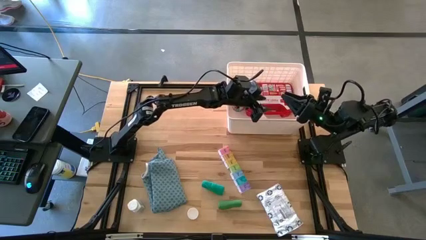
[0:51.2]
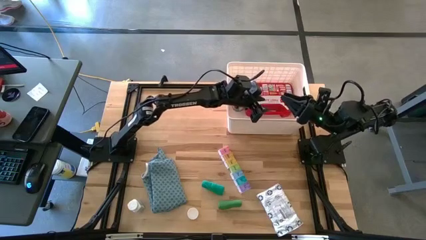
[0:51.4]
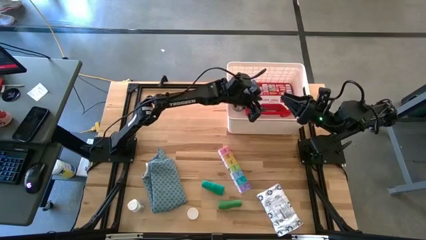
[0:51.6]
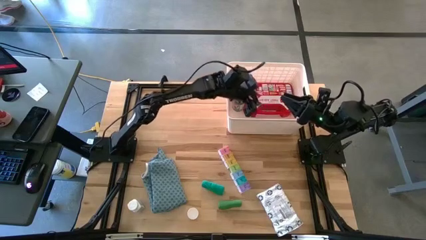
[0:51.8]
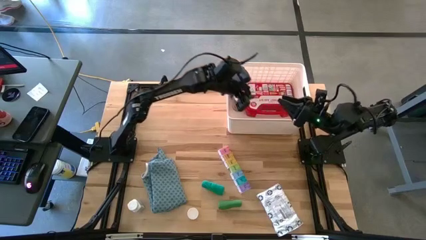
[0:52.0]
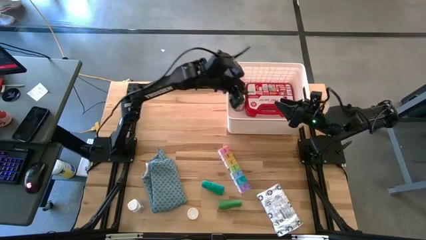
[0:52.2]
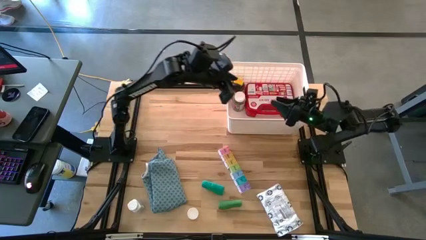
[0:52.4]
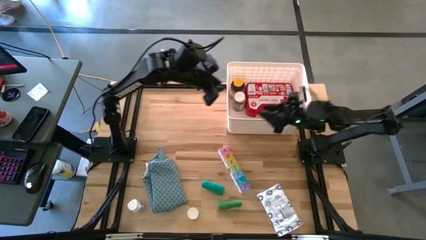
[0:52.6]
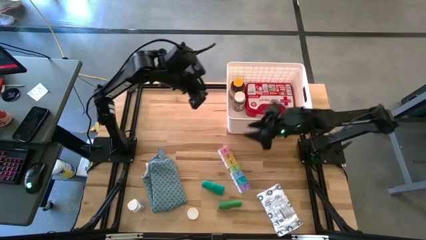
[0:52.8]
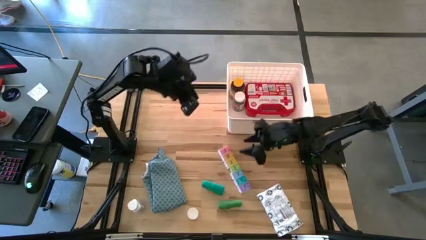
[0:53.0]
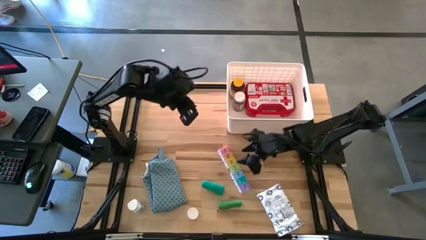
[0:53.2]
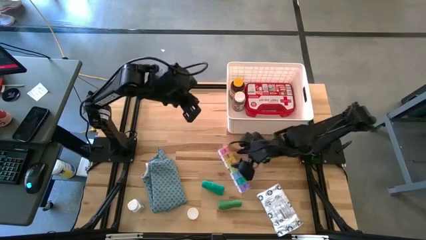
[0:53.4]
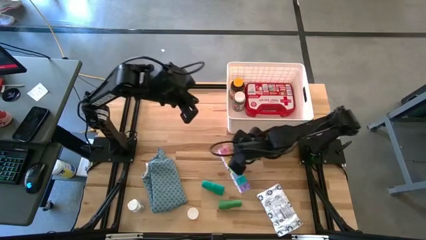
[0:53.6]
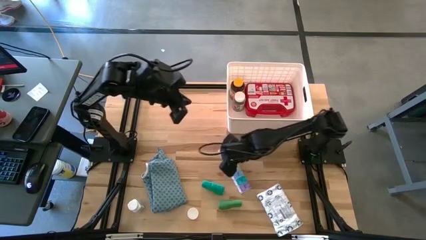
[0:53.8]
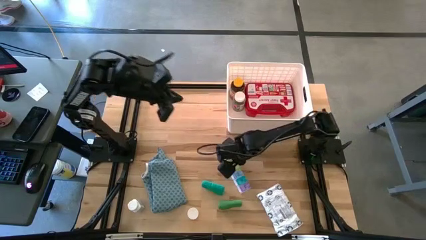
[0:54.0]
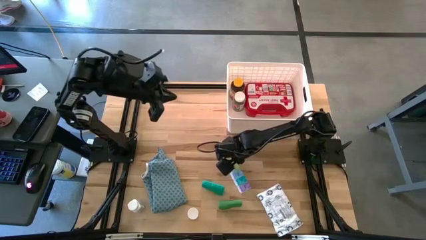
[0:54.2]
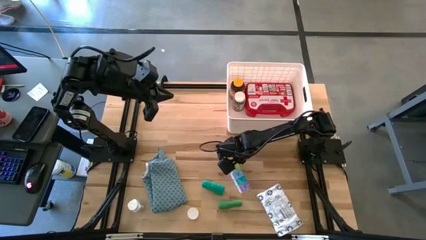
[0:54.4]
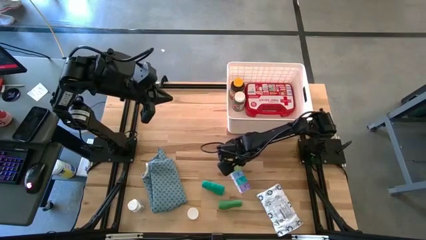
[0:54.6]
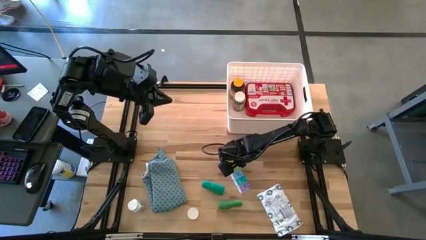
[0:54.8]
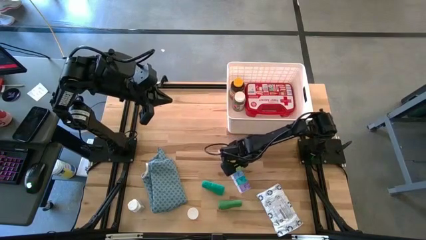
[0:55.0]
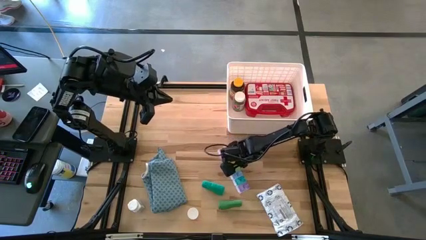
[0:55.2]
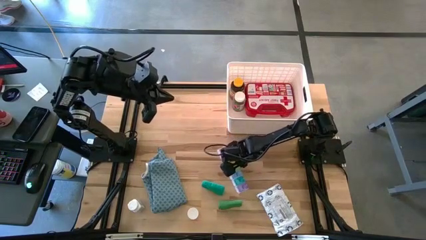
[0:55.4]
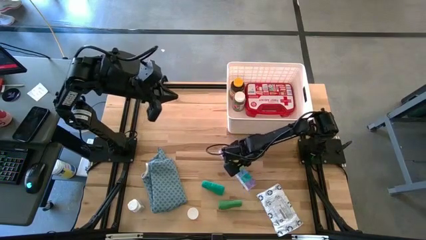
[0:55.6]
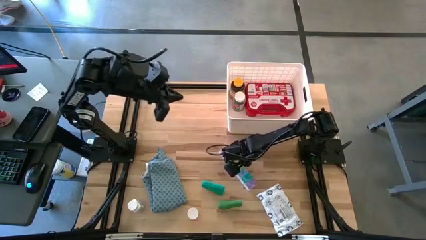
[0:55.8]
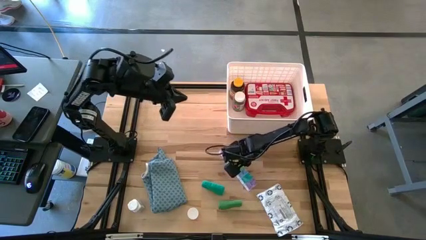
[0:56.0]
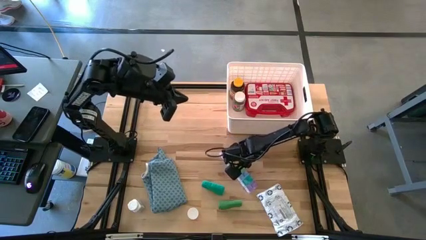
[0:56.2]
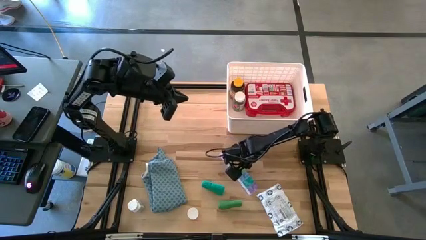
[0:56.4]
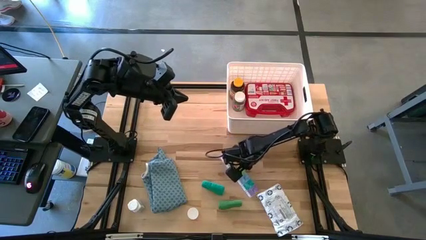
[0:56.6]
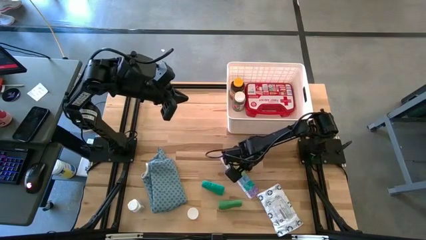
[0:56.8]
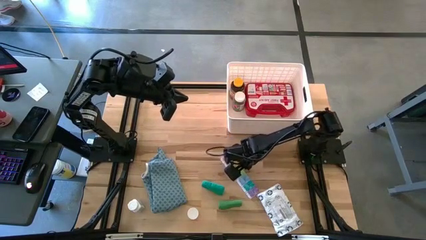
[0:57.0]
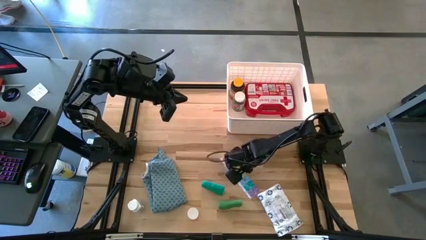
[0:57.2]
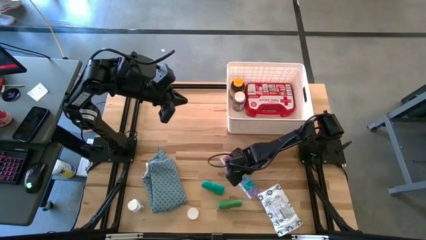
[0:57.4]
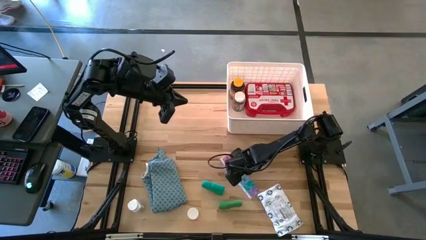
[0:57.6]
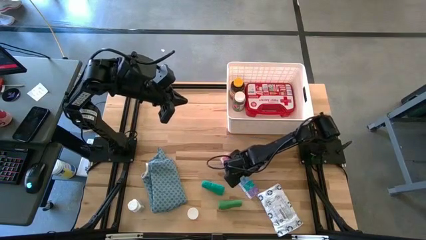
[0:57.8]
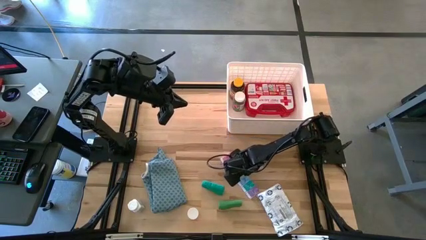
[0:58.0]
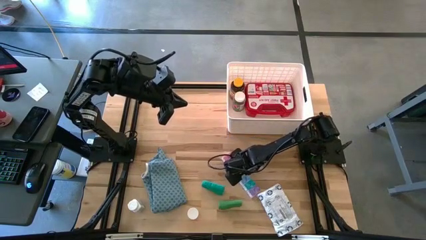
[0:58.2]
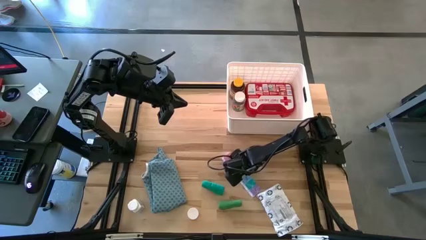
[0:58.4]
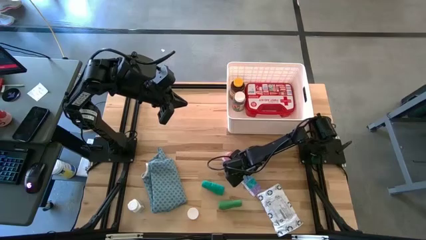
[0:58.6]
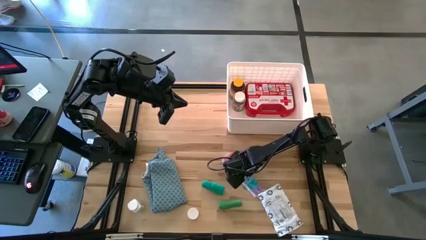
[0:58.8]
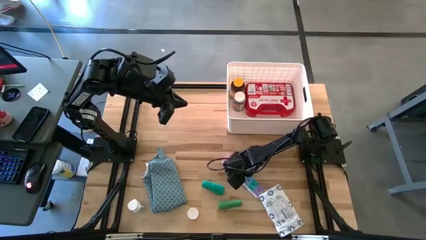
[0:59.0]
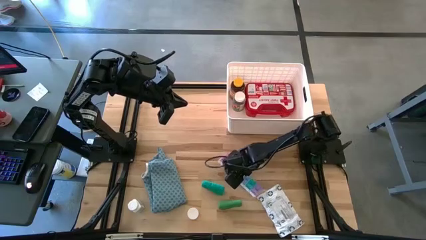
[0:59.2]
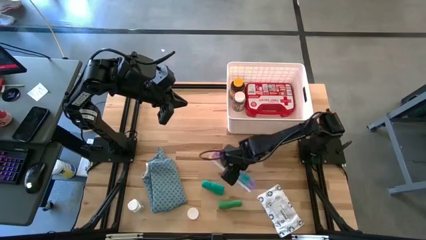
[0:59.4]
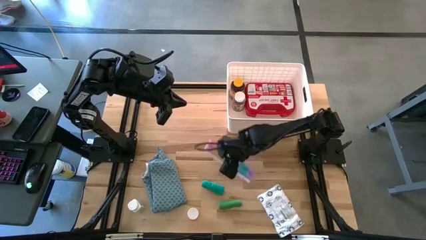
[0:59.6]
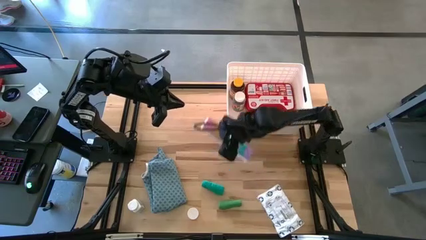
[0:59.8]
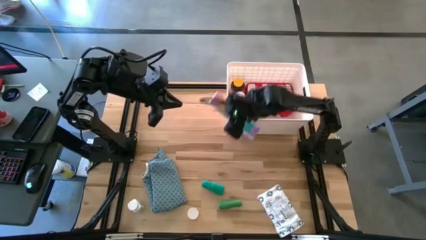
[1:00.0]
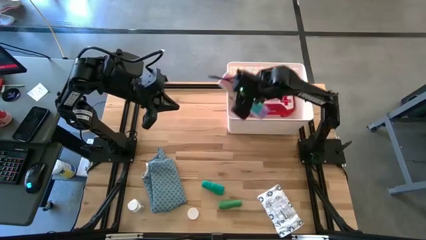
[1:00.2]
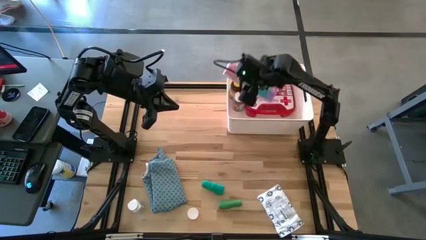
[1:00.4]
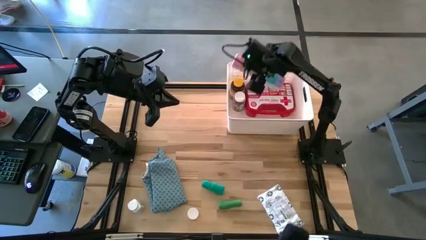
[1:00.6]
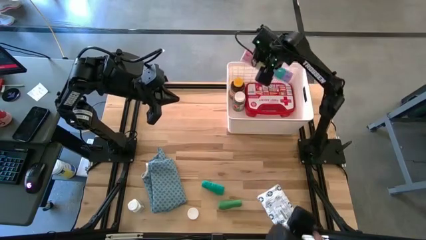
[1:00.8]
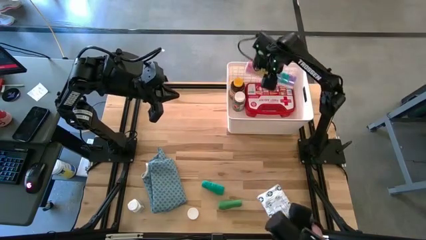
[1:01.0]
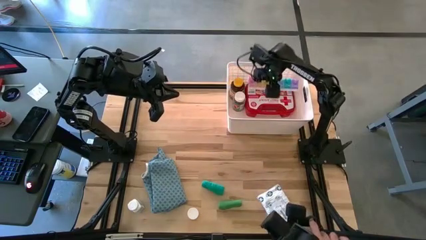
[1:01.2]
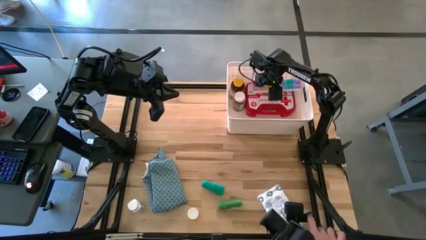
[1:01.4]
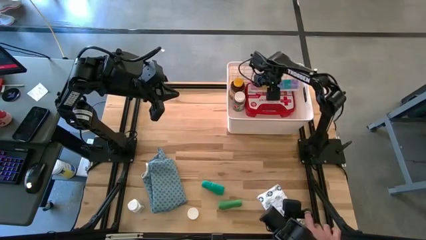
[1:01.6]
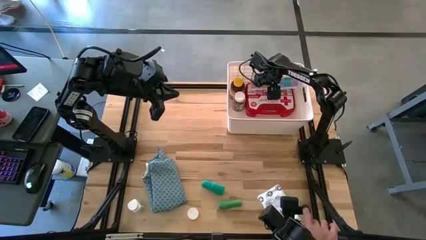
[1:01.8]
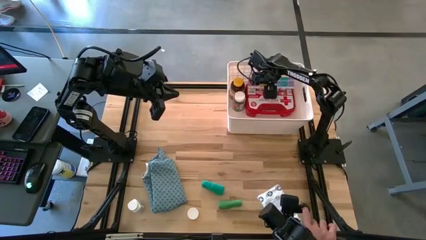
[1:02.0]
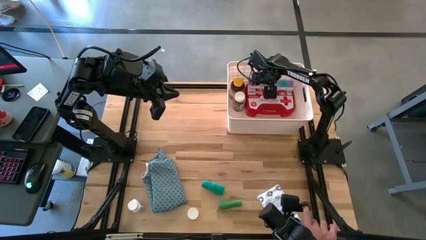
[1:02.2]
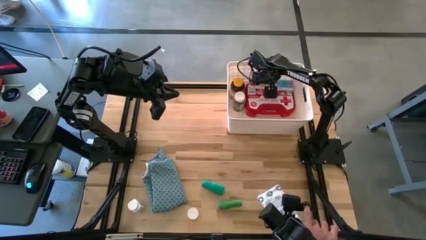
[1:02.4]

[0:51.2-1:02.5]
Task: Pick & place medical supplies in basket/bin
Put the medicine organizer into the white bin

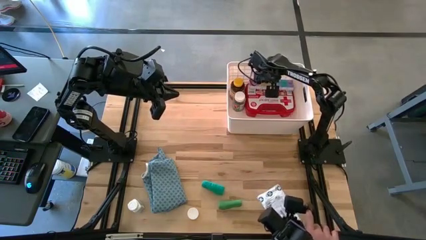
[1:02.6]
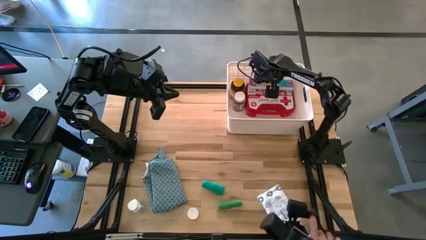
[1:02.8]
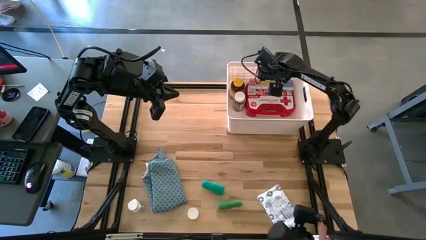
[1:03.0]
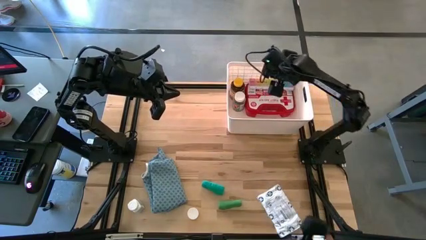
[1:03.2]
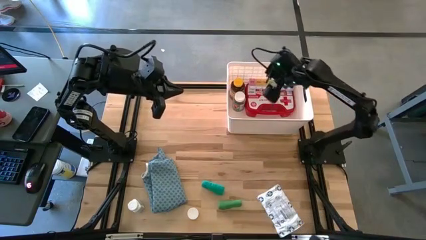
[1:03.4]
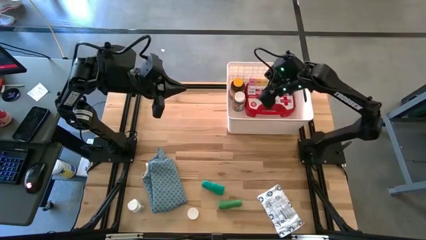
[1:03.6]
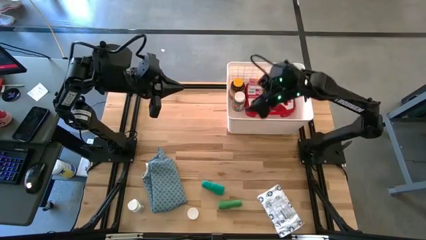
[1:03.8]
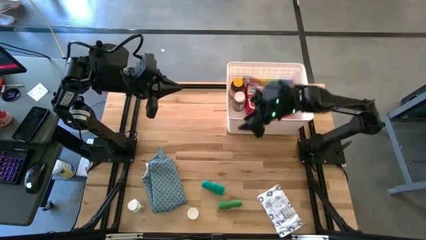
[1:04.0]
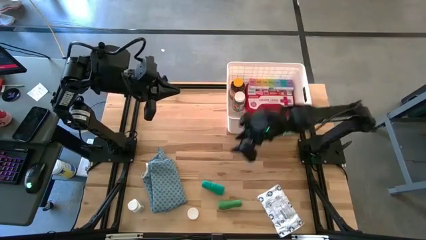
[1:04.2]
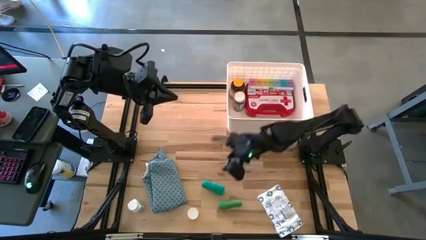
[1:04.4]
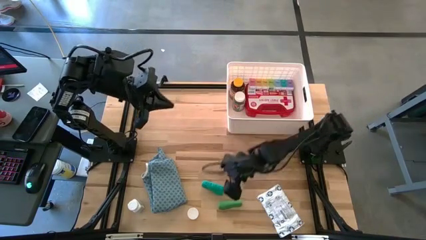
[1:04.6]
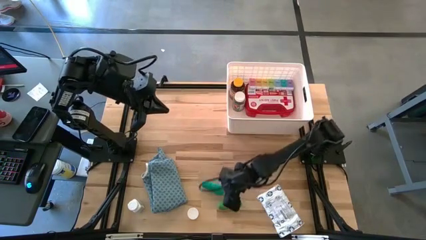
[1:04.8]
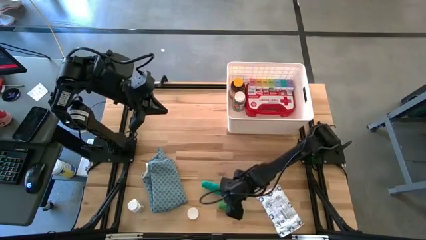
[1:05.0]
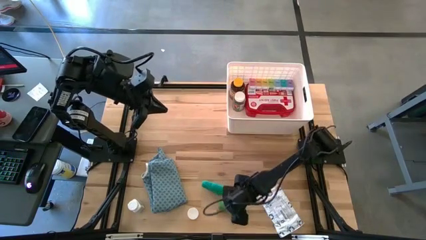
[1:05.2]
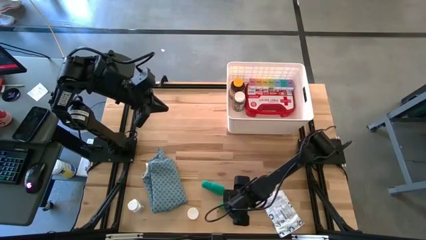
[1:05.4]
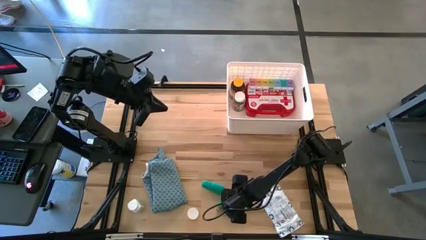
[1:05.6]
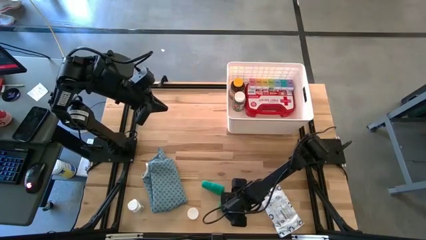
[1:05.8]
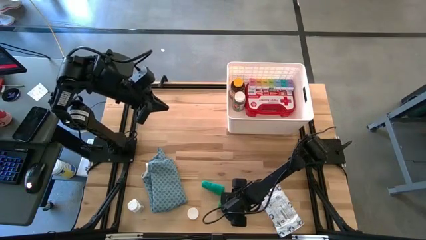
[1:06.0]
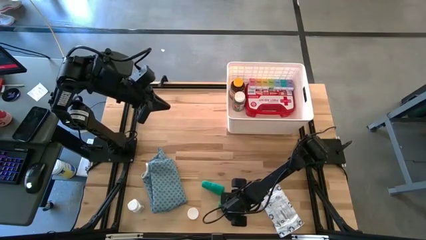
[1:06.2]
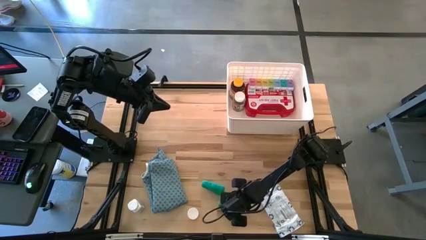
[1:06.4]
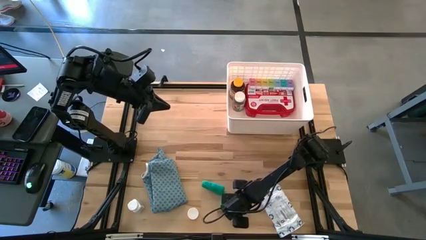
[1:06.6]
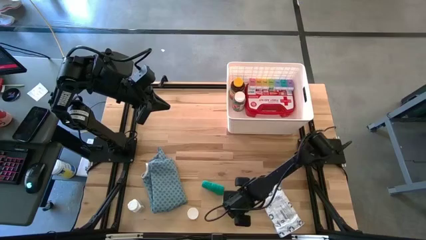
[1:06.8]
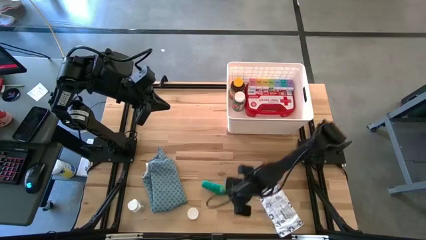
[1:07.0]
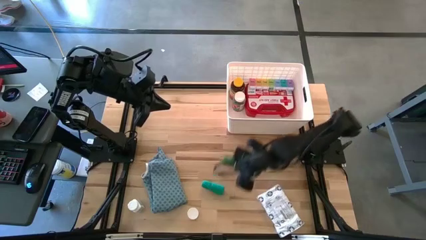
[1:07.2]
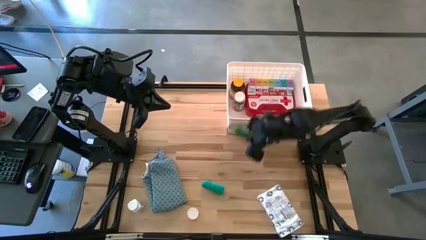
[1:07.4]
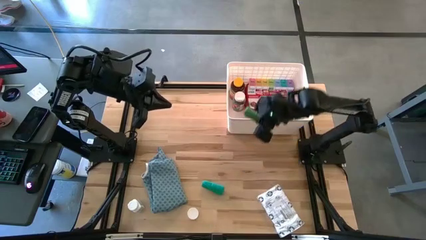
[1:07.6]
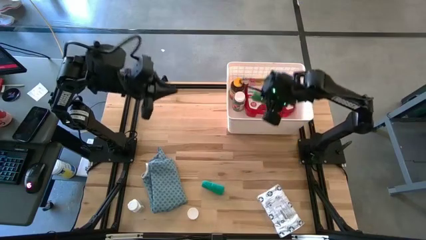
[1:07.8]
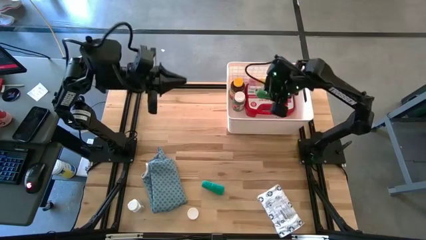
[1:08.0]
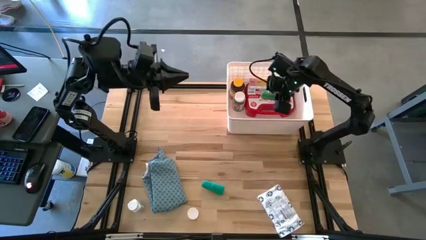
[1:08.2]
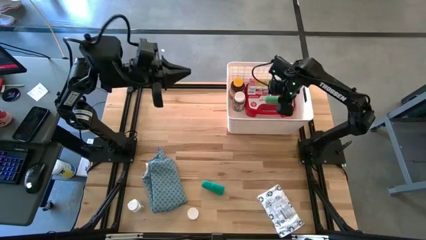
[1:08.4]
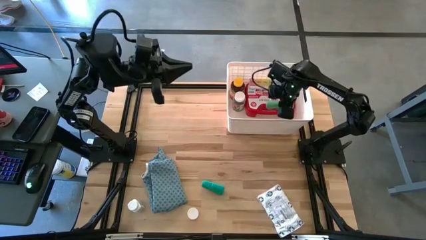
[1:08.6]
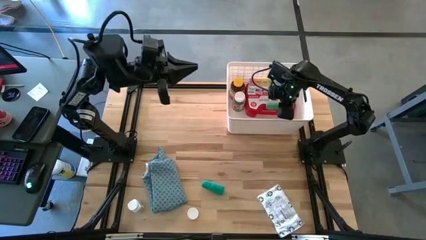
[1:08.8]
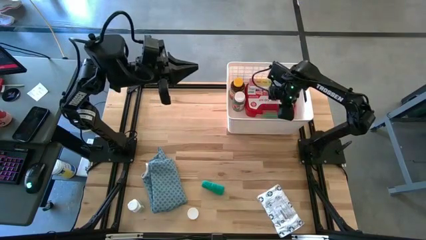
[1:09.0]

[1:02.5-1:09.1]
Put the green bandage into the white bin
